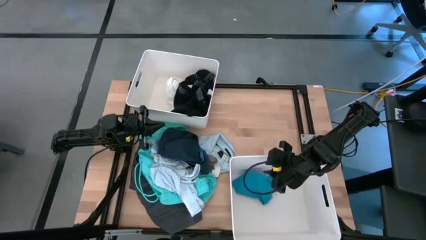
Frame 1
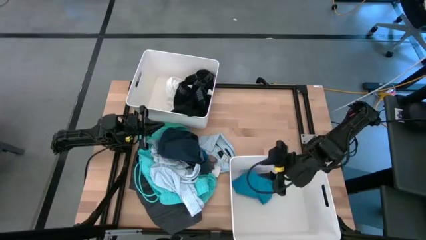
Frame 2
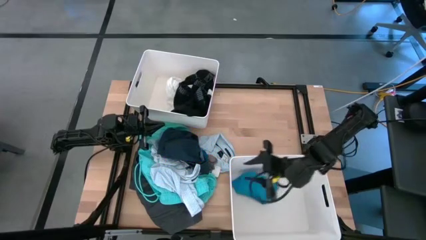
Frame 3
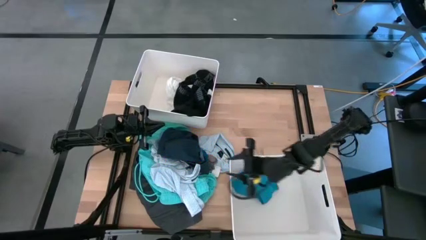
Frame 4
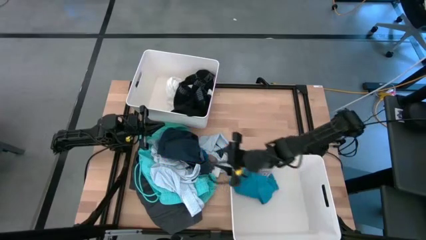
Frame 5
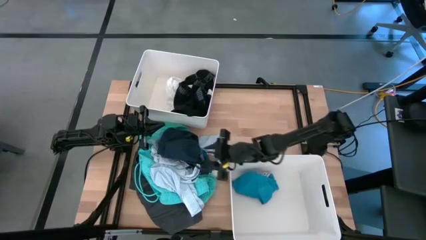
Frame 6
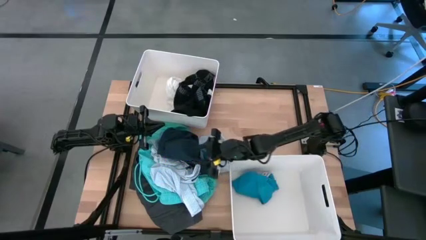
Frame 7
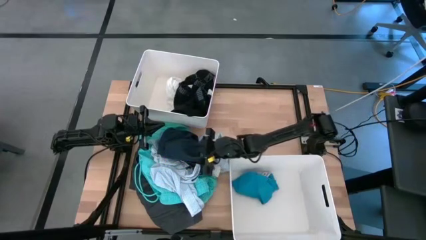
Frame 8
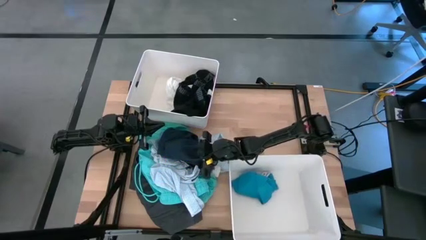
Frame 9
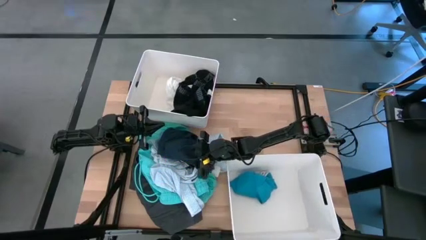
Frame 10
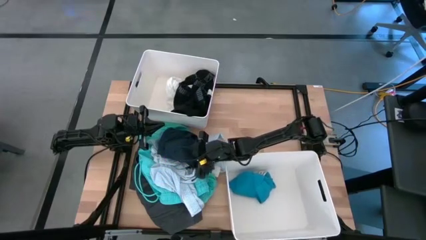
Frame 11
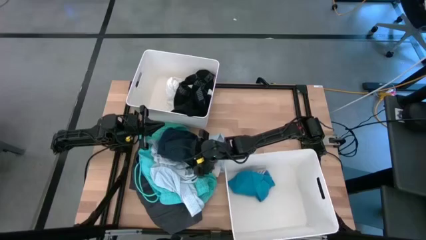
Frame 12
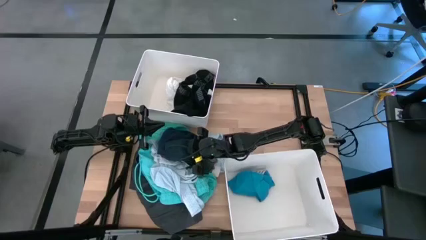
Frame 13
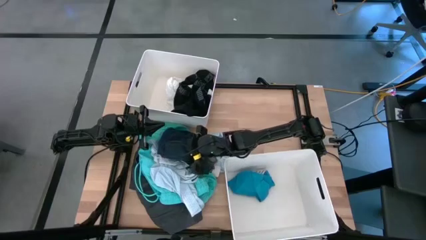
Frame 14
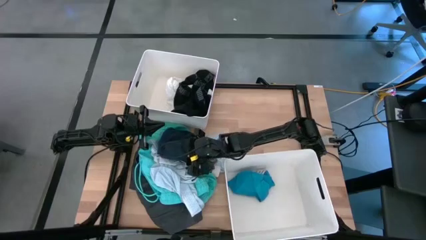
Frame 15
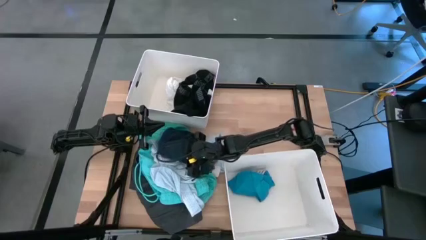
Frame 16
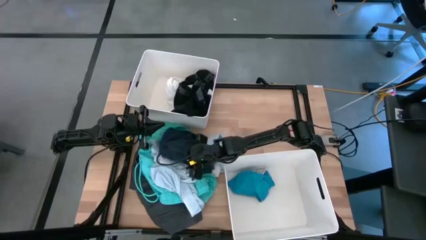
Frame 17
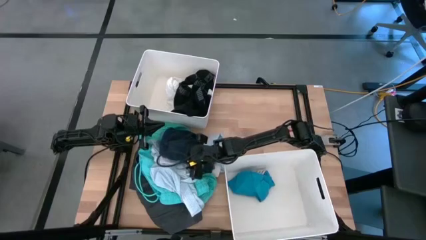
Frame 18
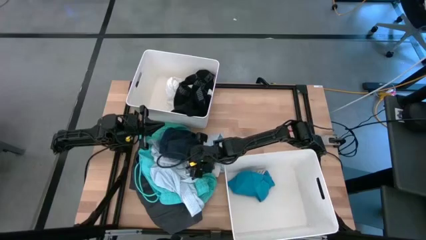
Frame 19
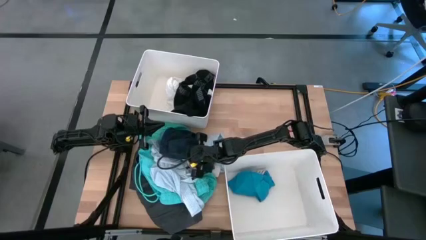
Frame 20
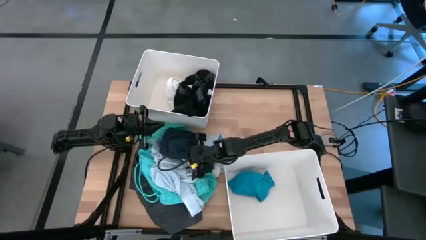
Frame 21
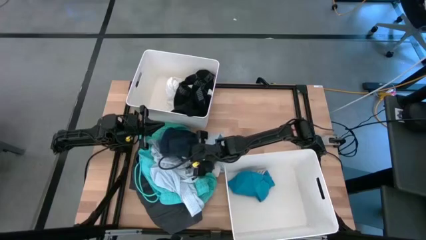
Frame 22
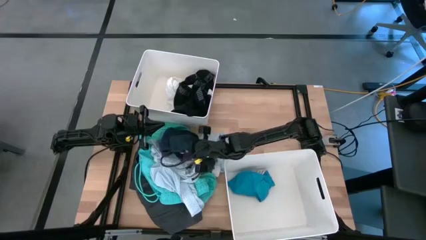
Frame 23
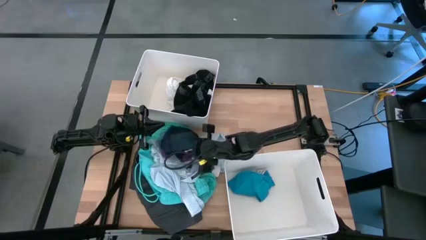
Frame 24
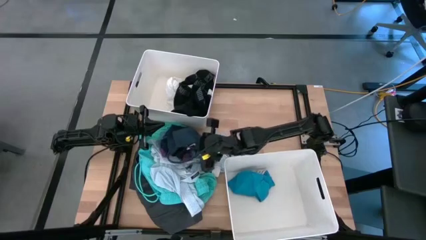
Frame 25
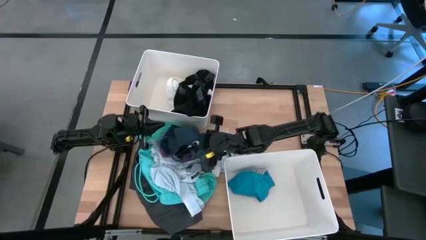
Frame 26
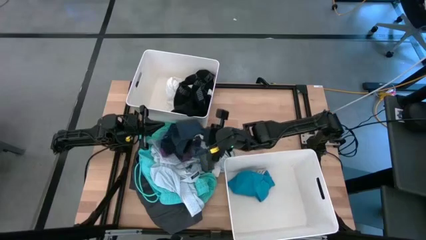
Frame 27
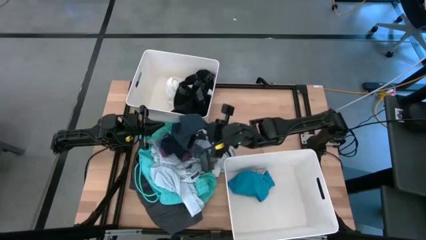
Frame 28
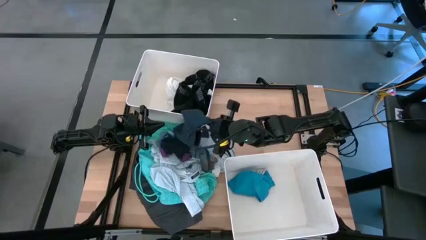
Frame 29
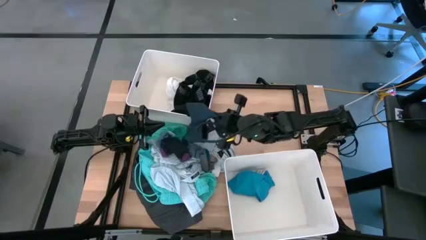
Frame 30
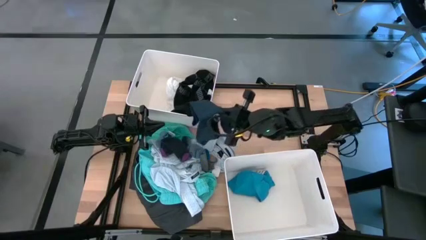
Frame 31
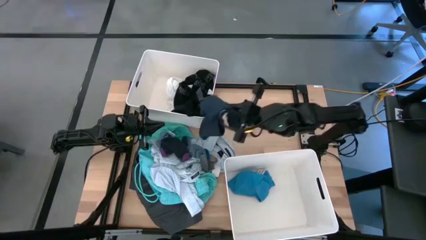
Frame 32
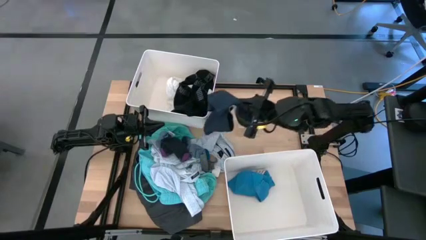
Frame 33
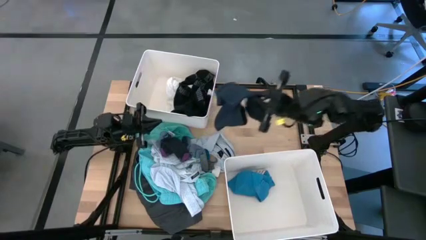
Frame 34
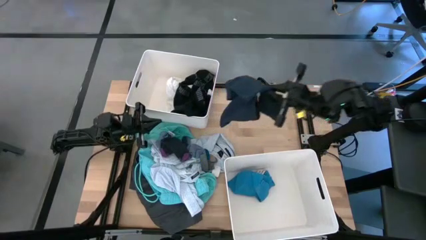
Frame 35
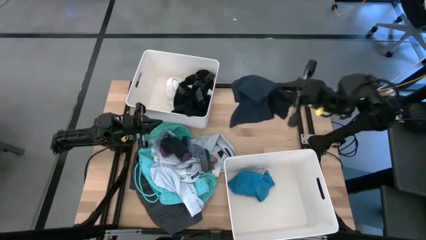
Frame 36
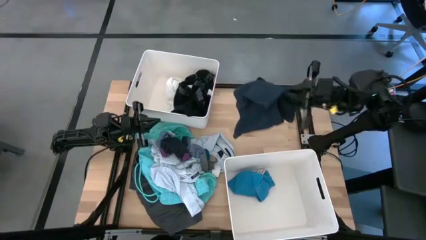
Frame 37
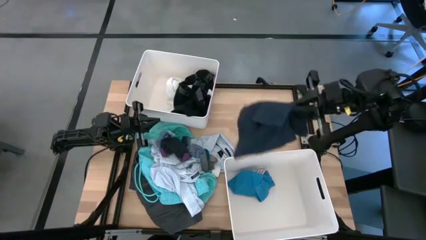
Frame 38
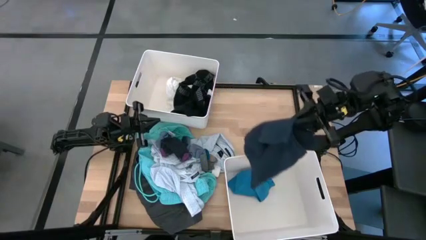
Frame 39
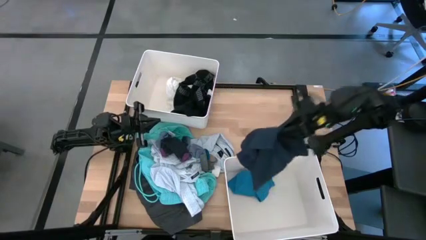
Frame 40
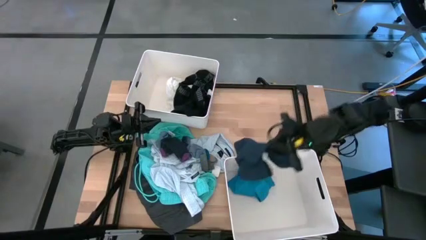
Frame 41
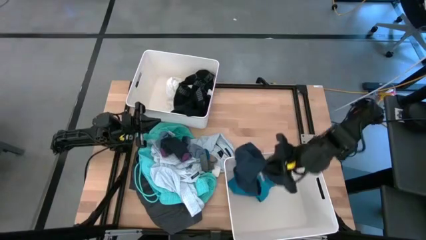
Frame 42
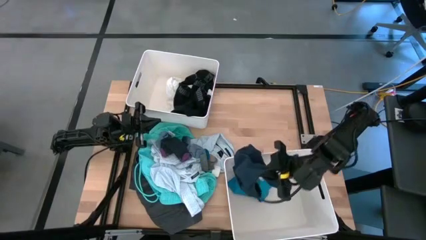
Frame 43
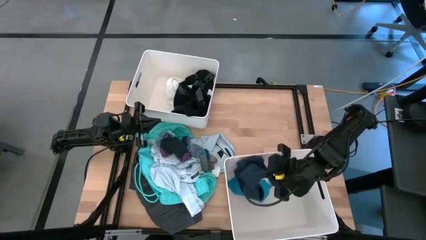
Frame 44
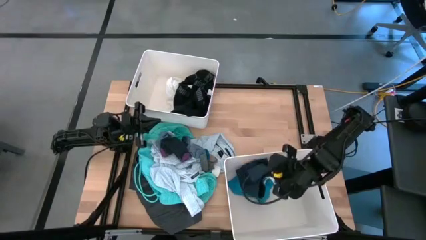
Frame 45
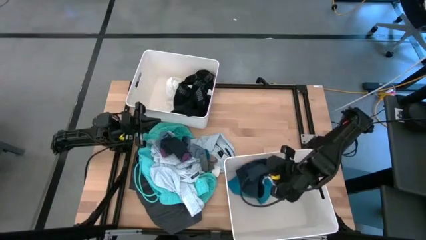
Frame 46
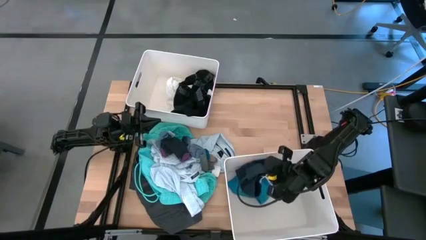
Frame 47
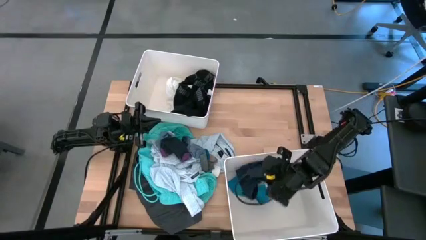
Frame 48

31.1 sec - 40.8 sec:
Task: Sort clothes
Put the dark blue underwear into the bottom white bin

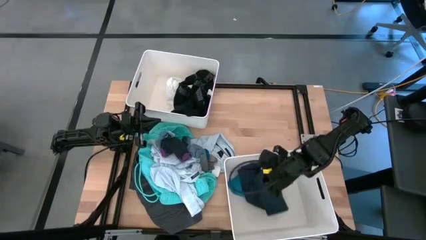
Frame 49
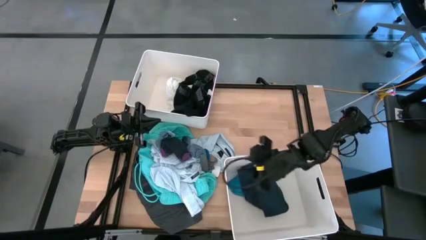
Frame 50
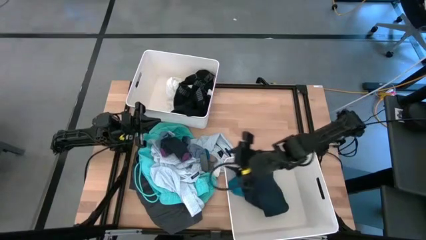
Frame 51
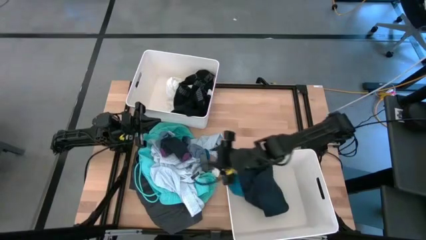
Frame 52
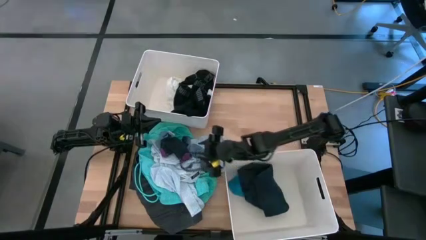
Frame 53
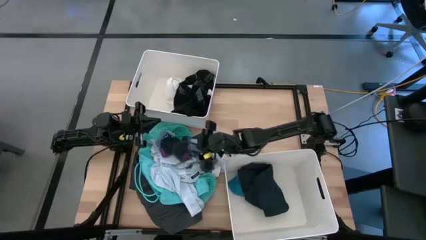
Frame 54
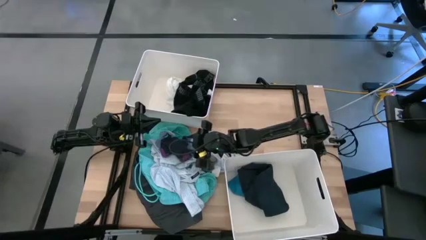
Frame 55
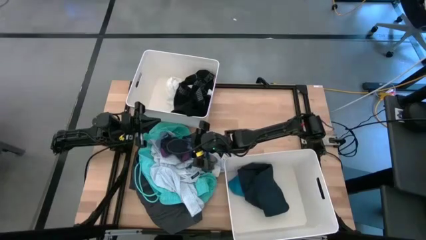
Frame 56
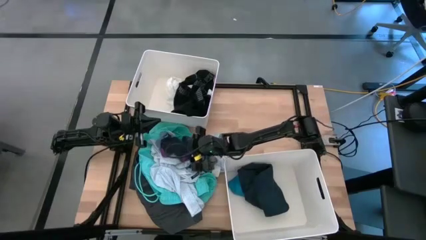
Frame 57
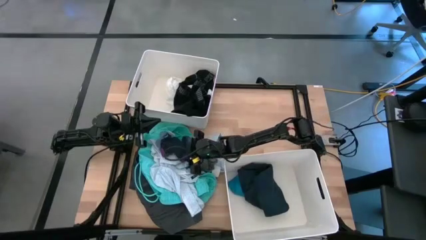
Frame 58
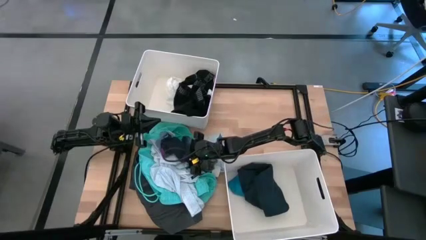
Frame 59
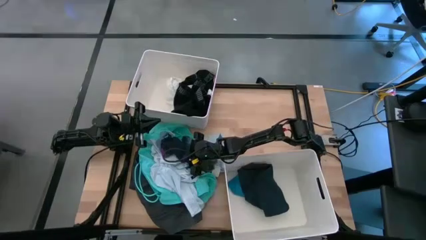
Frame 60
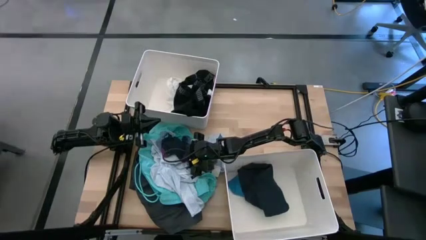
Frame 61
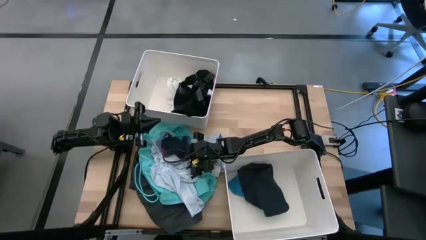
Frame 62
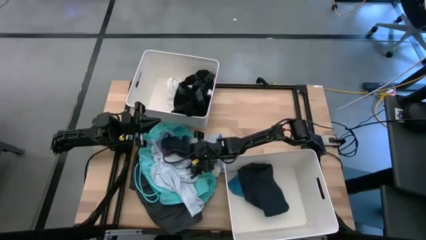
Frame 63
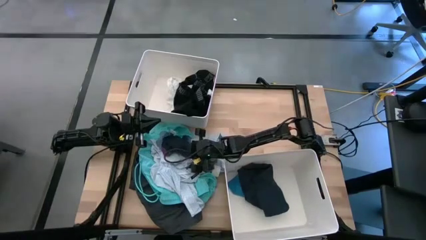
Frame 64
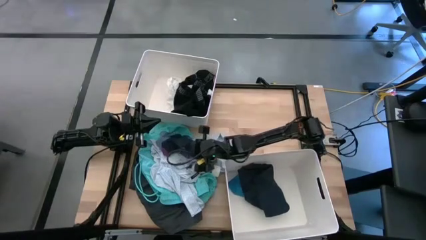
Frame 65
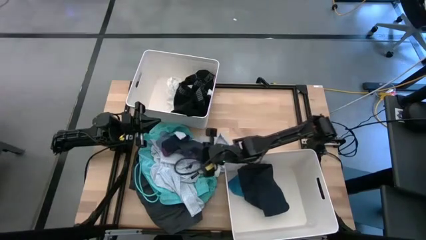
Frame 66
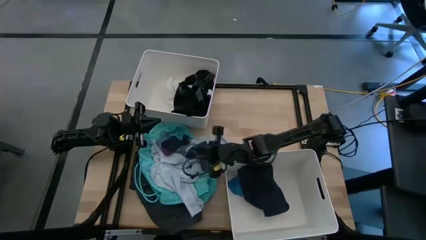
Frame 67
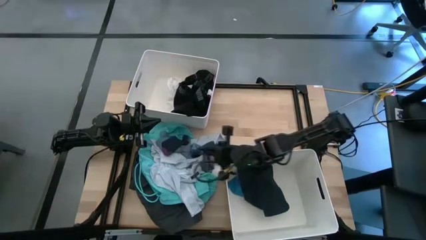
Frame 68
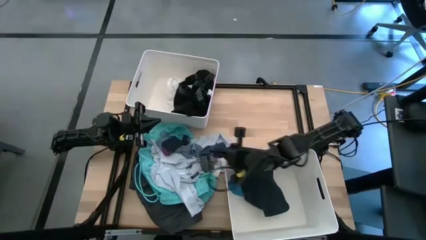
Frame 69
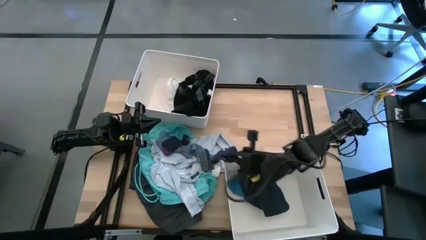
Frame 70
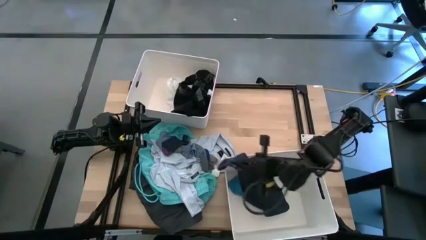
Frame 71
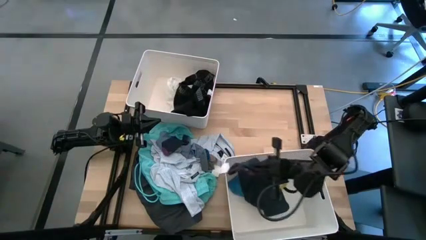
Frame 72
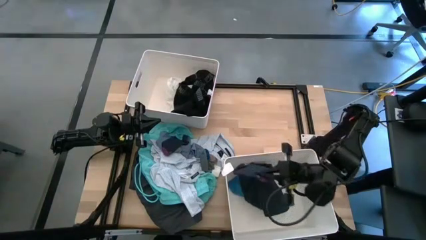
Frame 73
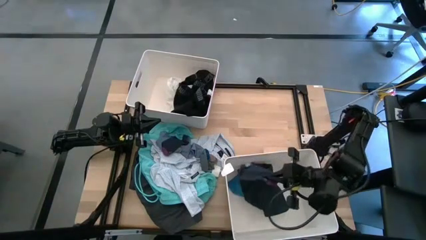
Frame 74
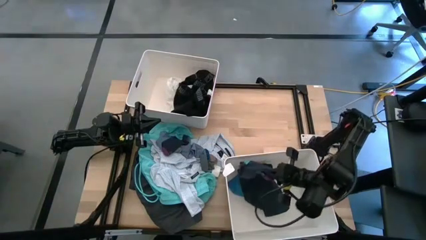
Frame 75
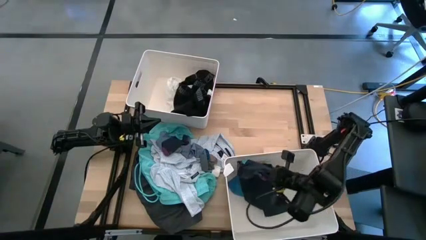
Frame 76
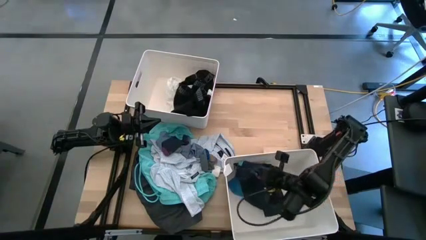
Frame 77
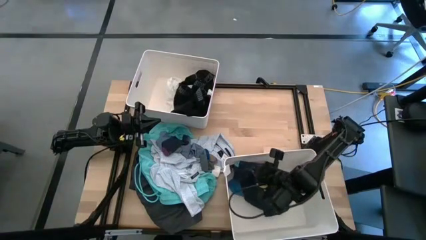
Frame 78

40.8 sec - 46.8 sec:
Put the purple black sock into the bottom white bin
